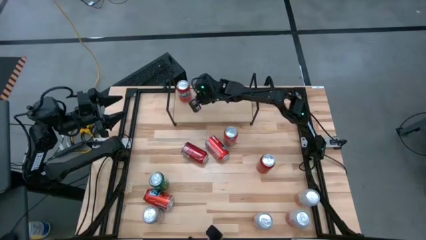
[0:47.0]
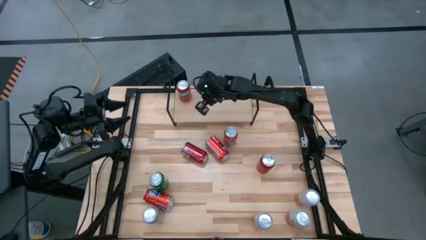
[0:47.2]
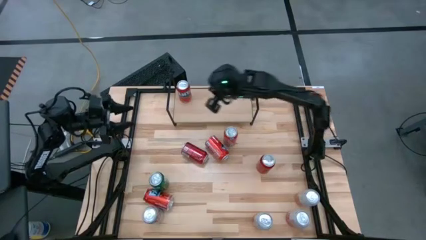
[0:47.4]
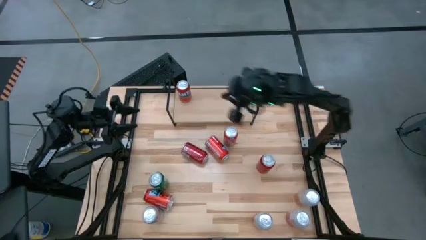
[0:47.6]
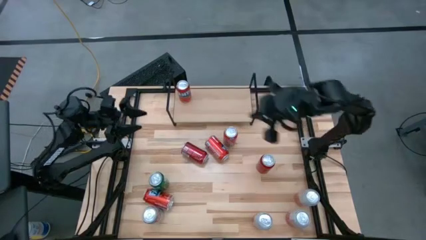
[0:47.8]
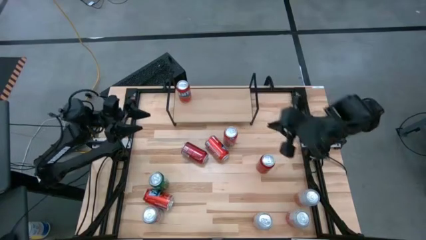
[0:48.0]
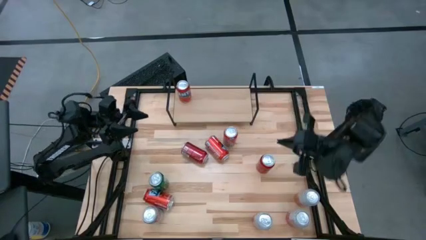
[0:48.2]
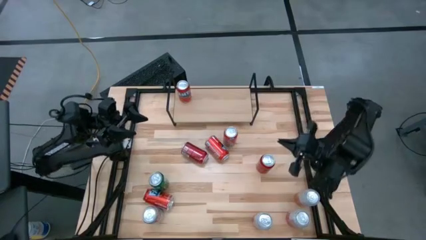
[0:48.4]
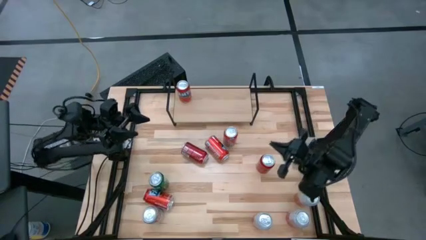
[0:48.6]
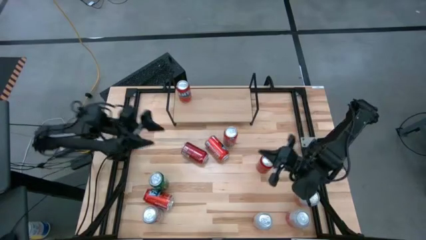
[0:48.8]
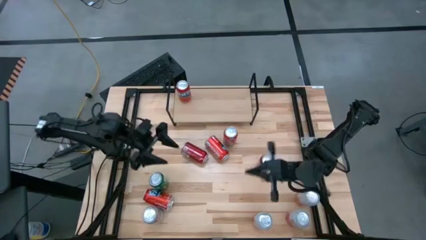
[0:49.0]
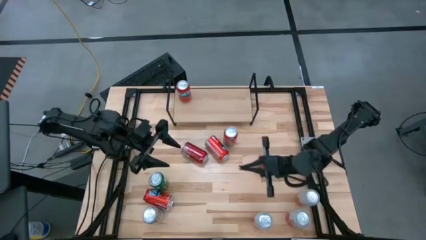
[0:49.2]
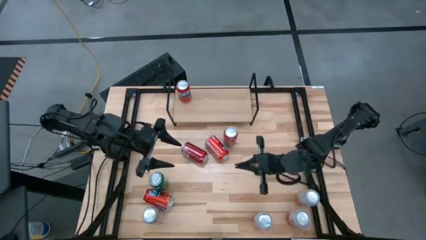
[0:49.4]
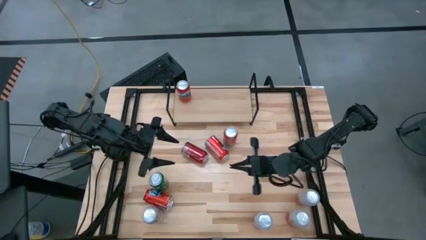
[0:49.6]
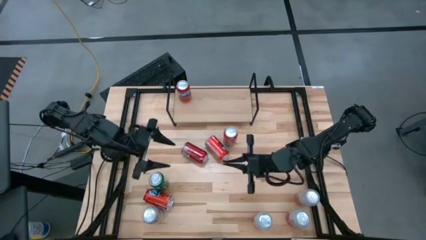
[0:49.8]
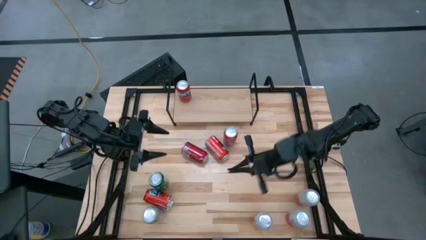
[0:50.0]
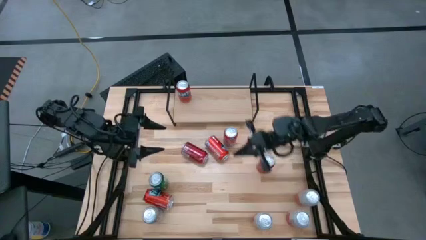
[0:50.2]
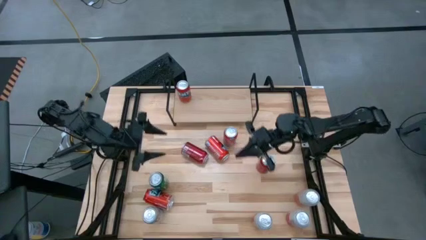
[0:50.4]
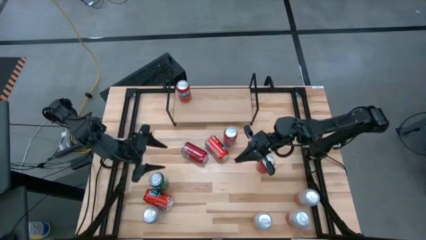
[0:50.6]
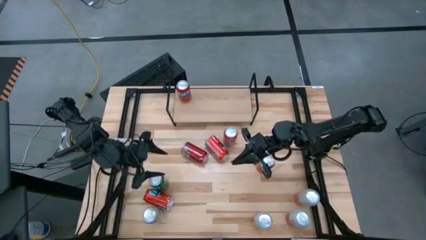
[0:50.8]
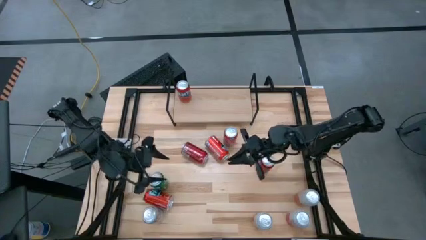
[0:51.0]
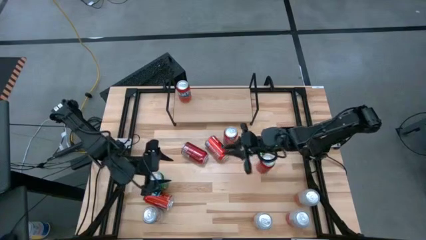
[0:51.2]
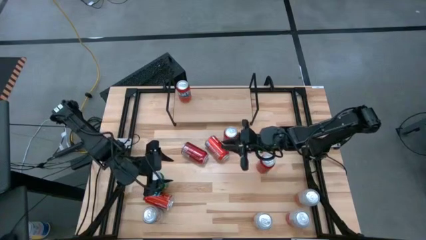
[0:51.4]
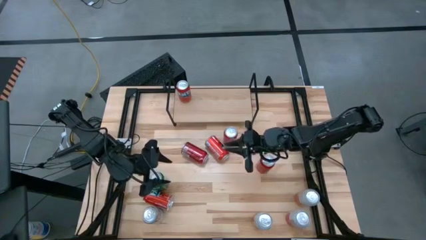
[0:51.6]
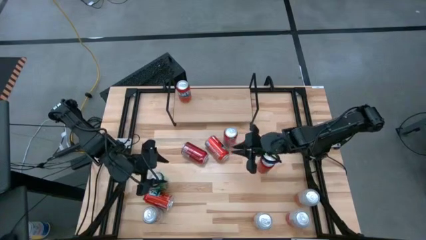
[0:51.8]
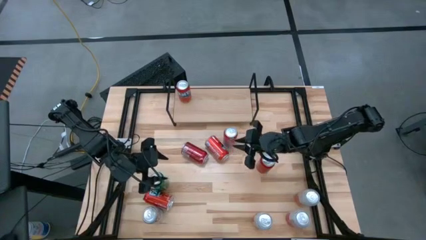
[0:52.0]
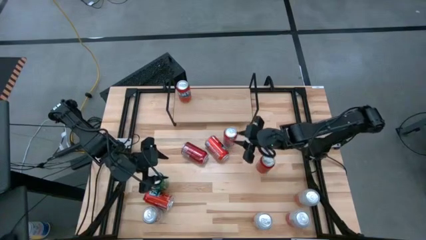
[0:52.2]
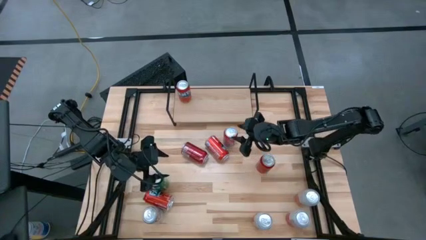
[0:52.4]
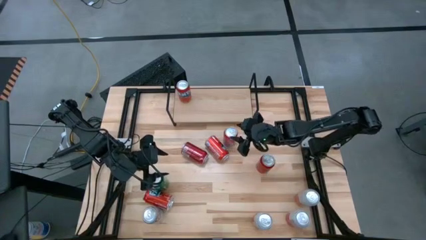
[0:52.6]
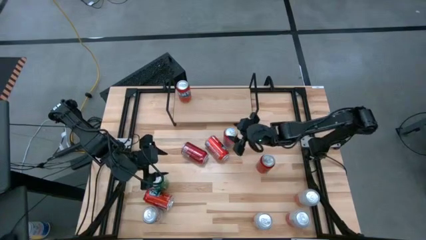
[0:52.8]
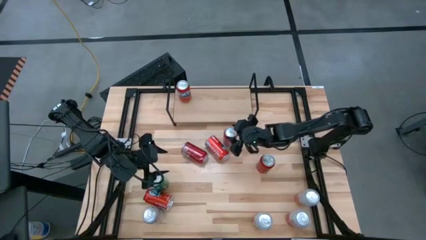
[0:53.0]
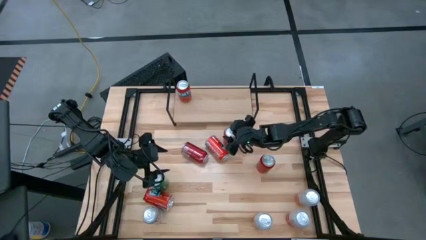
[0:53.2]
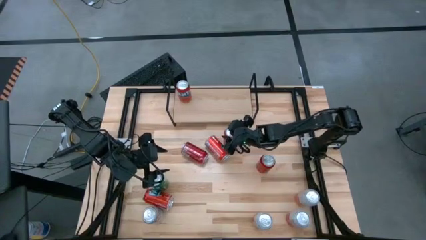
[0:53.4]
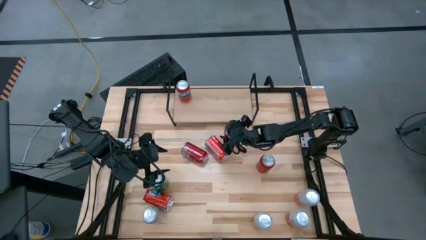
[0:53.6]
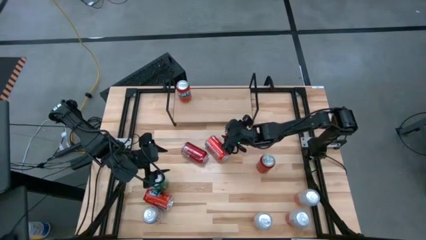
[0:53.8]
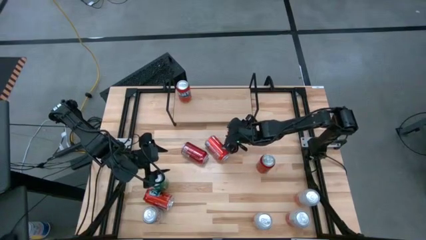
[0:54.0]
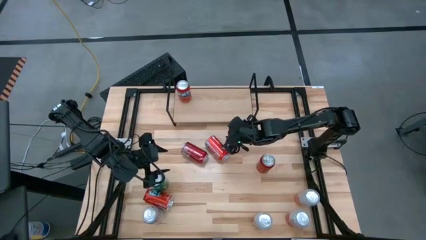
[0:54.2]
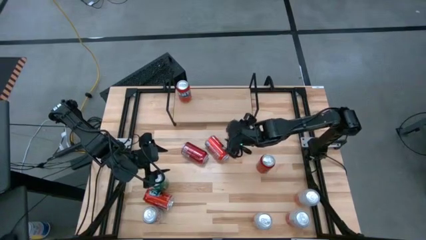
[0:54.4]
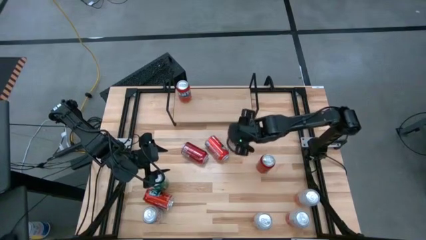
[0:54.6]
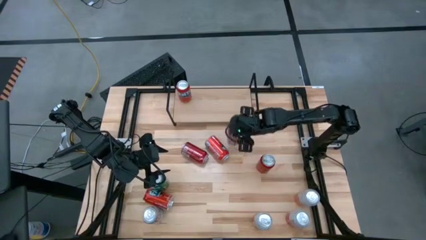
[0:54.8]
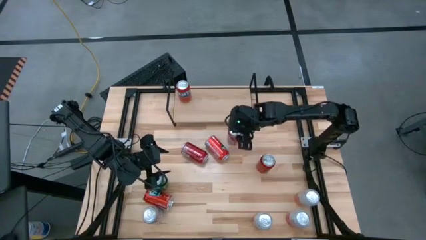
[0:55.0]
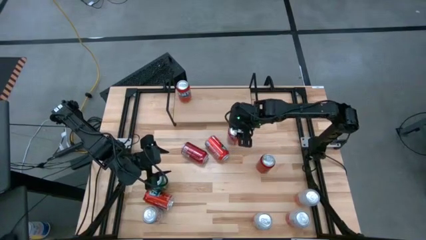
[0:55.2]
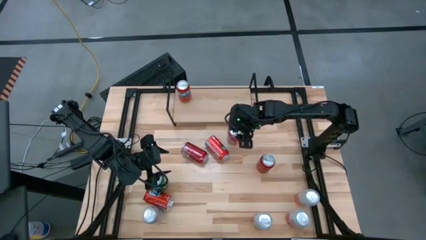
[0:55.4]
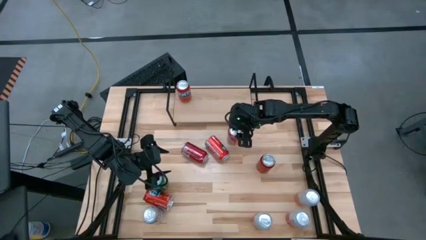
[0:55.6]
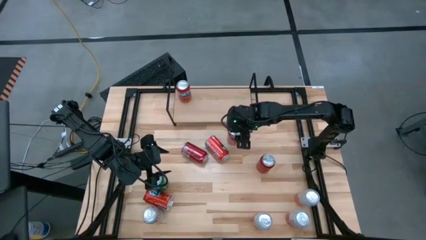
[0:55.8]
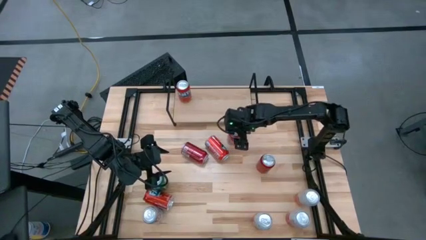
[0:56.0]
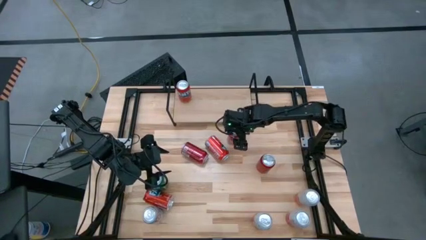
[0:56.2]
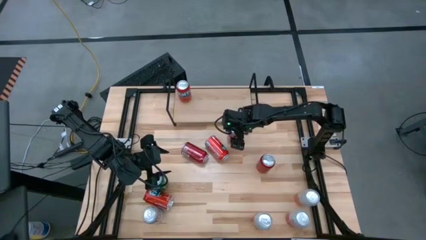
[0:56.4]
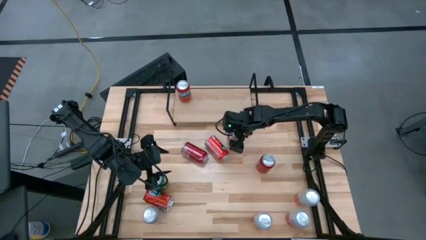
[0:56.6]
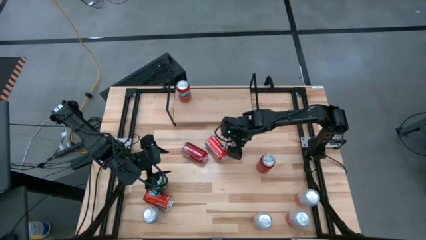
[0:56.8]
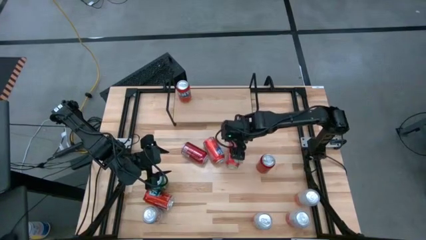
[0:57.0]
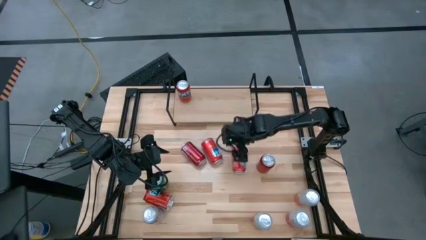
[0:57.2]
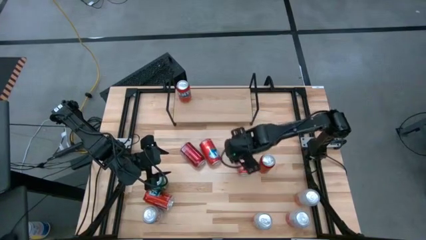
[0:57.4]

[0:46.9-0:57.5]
Task: Place canned beverage on shelf
Put the red soda can on the shelf and align with the other red soda can
